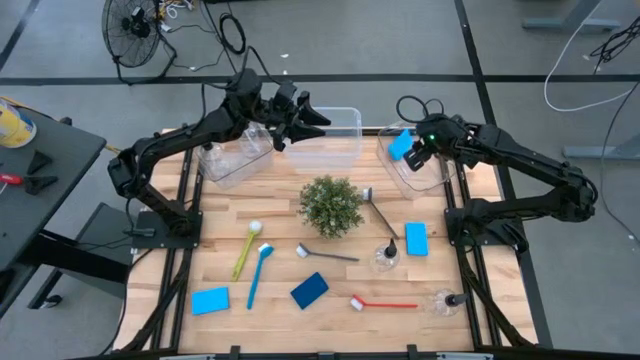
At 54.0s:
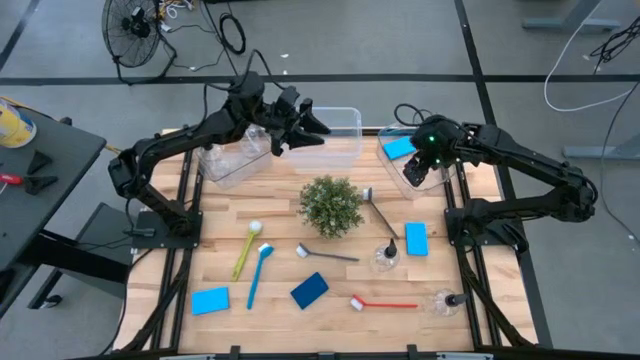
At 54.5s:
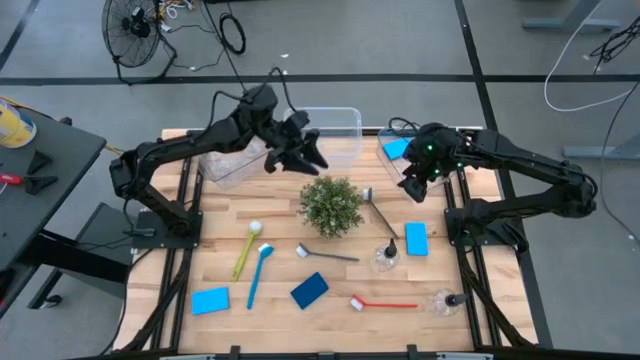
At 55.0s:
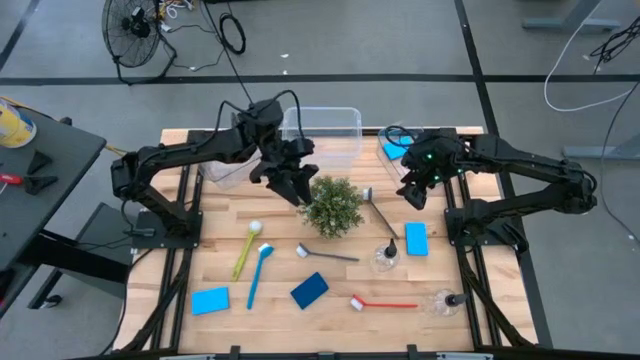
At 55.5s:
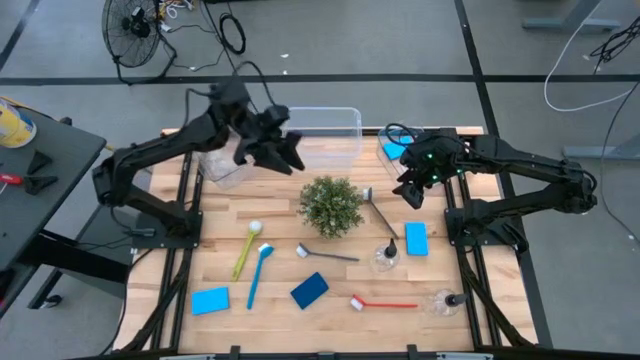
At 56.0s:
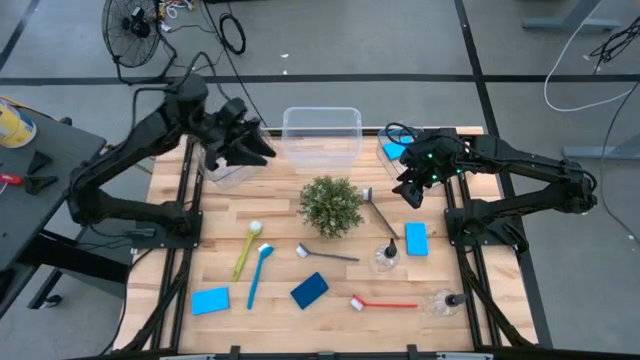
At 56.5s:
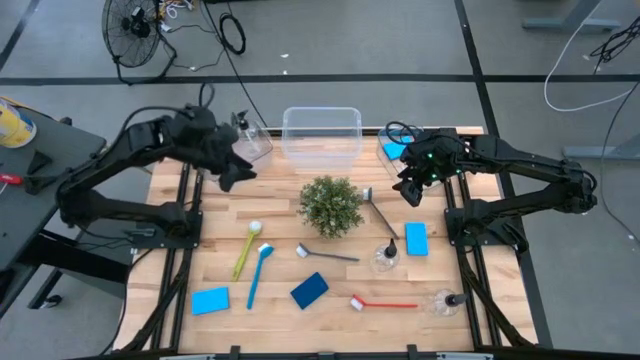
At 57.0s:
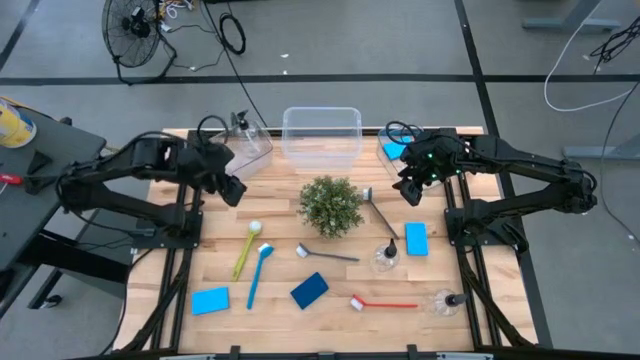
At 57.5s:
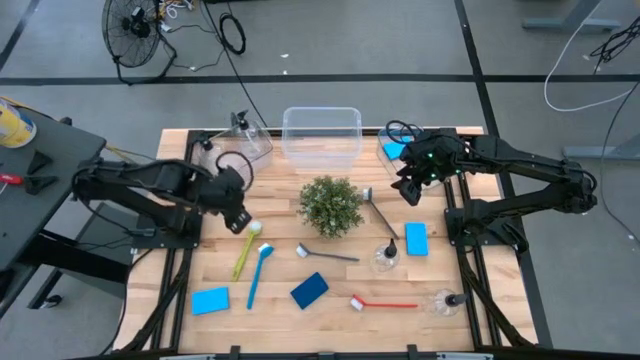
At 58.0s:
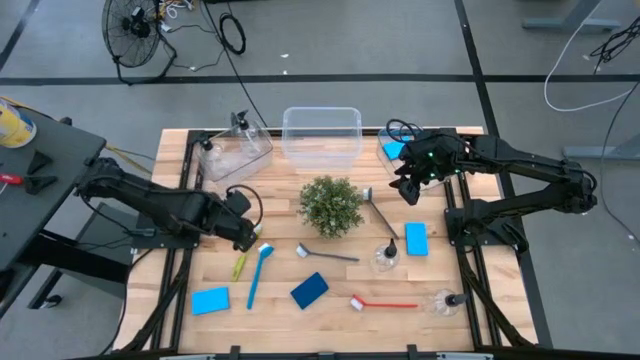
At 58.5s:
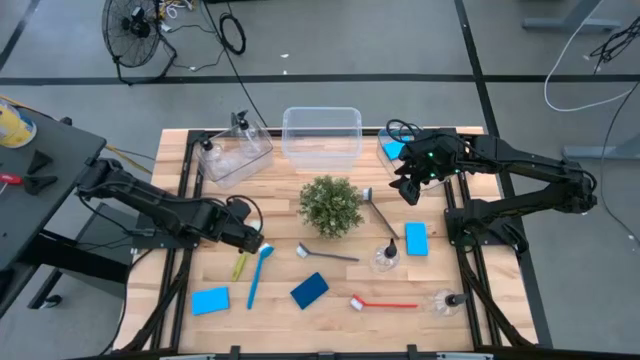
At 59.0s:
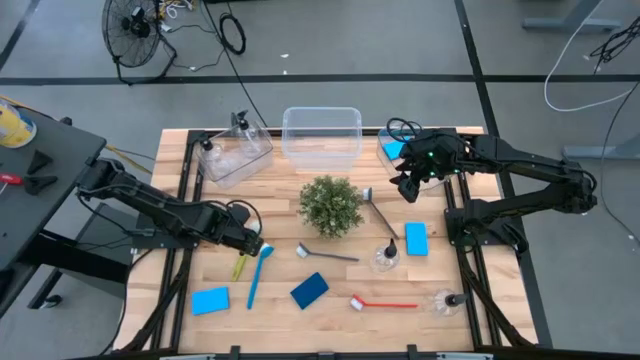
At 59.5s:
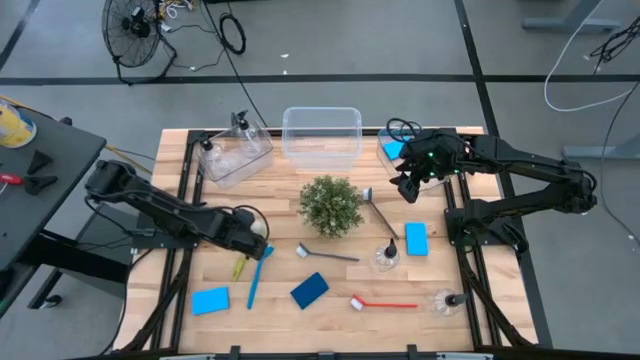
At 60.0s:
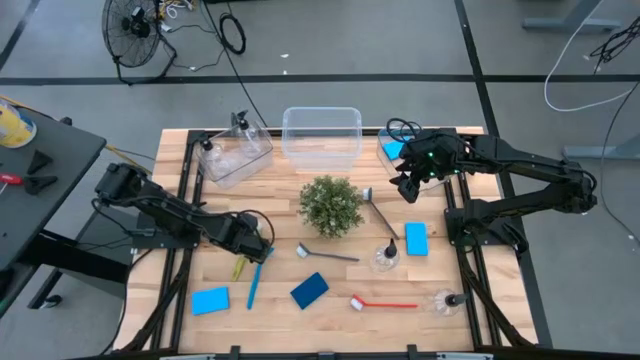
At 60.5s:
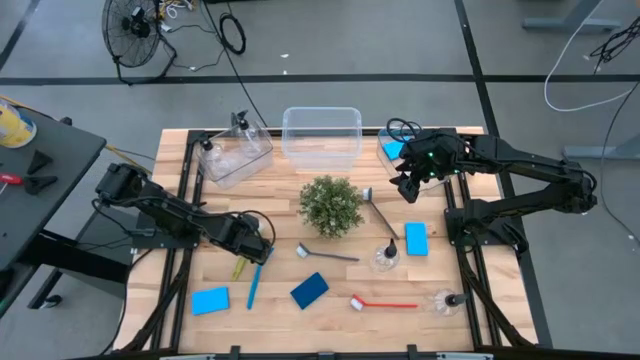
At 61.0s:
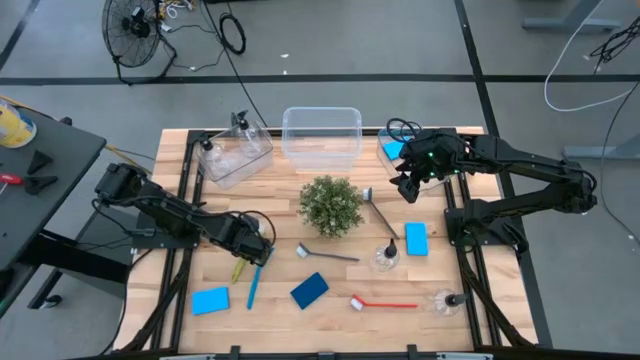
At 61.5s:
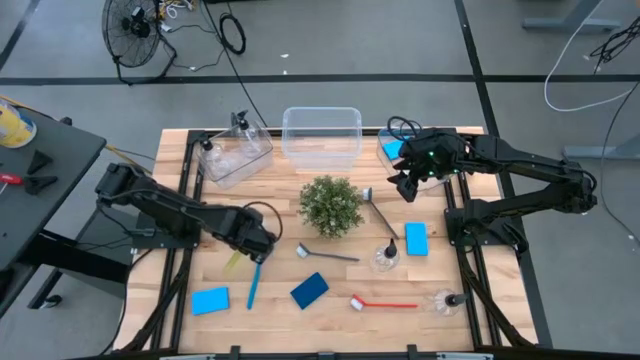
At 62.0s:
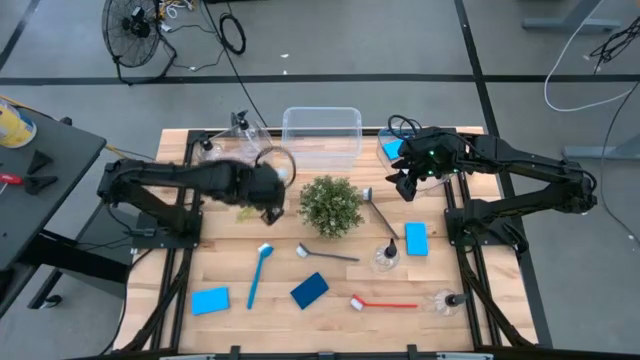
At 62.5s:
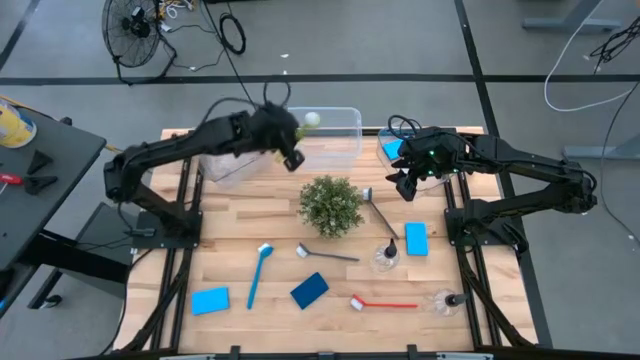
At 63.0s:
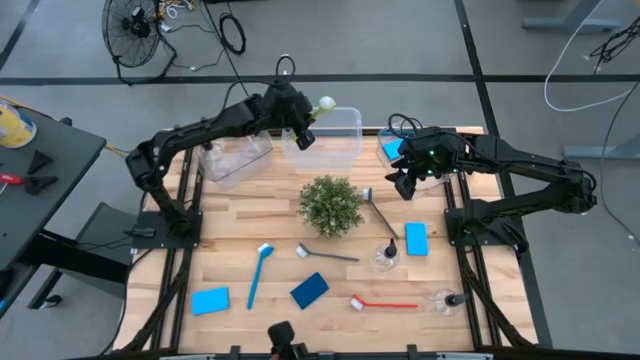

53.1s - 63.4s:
Task: Pick & Place Kitchen Sink Supplies
Put the green dish brush into the white bin

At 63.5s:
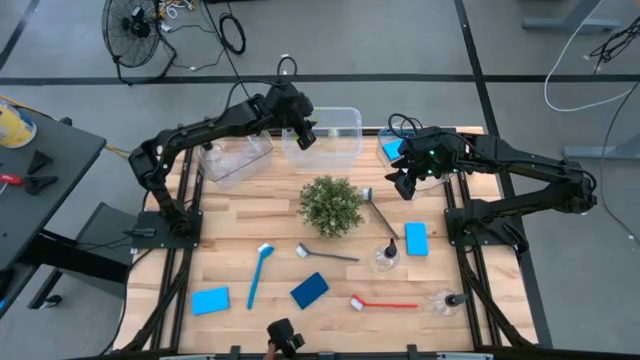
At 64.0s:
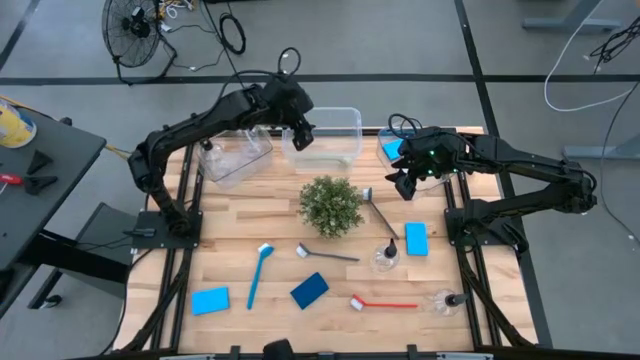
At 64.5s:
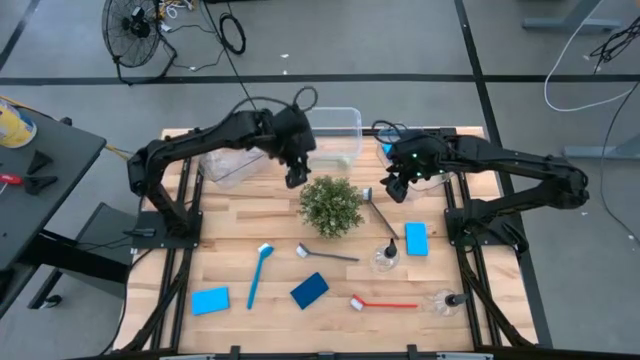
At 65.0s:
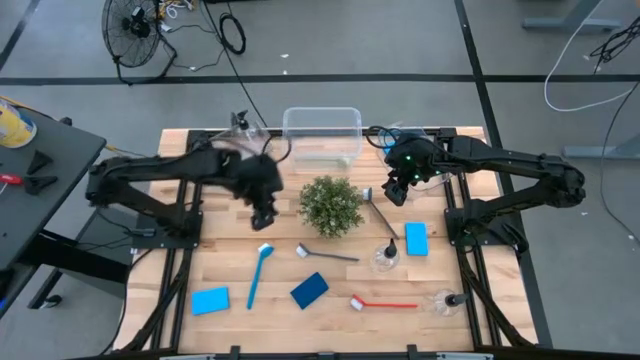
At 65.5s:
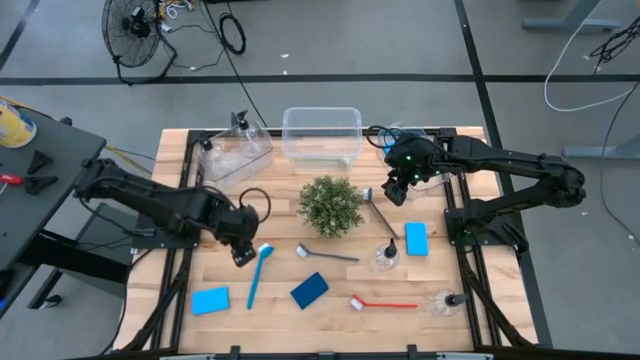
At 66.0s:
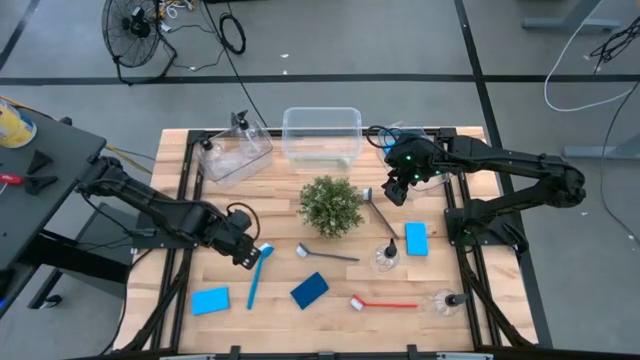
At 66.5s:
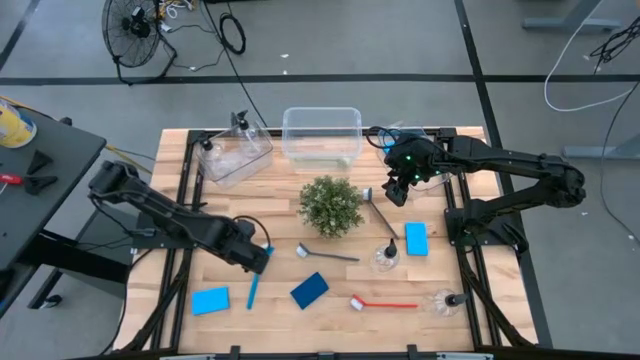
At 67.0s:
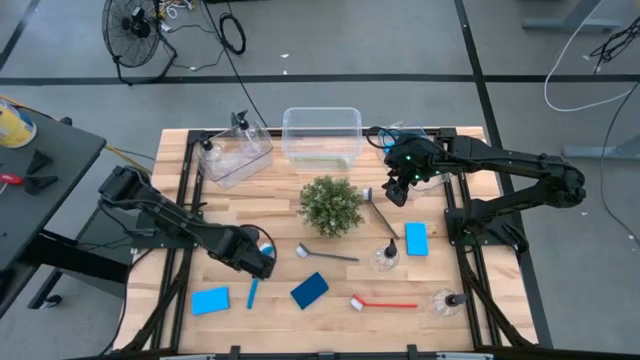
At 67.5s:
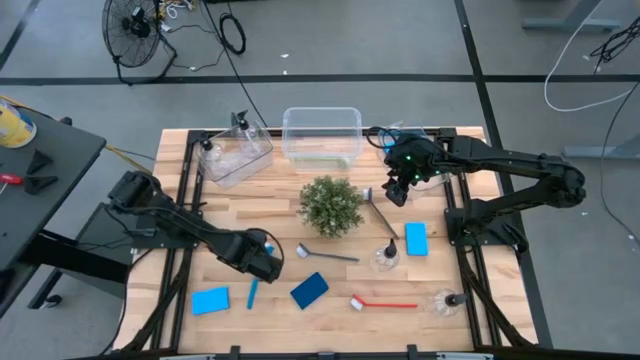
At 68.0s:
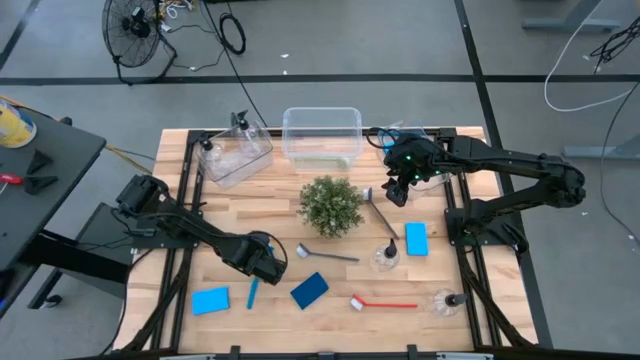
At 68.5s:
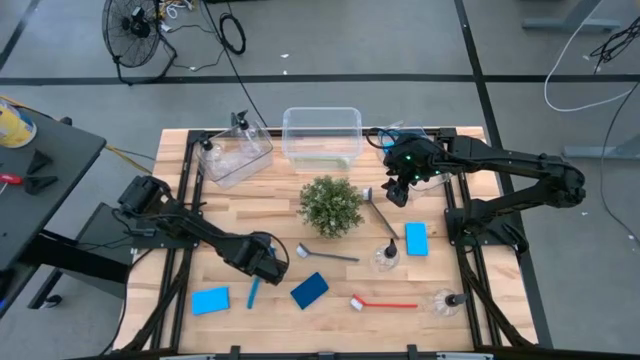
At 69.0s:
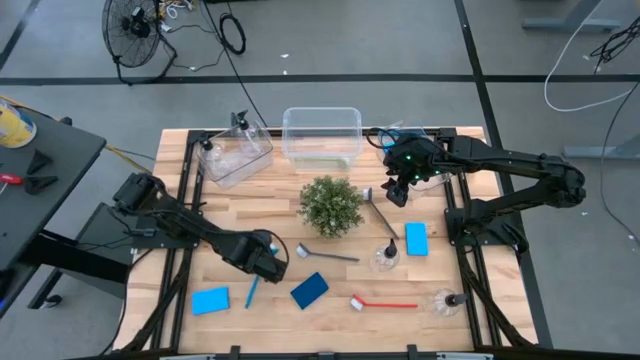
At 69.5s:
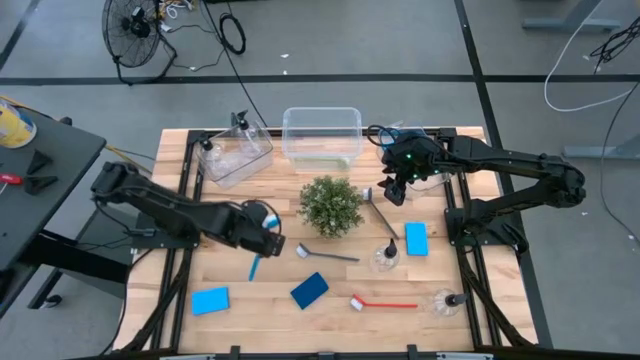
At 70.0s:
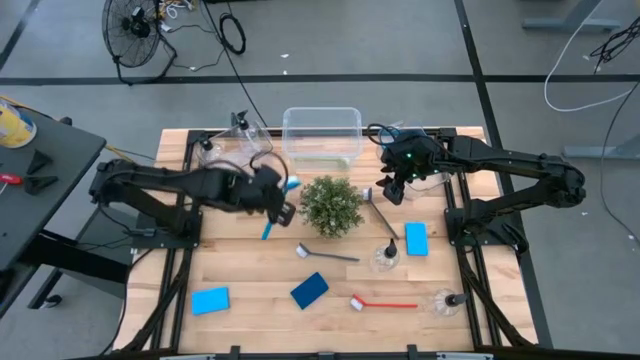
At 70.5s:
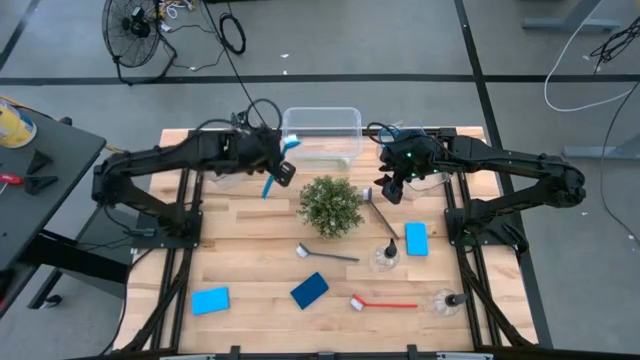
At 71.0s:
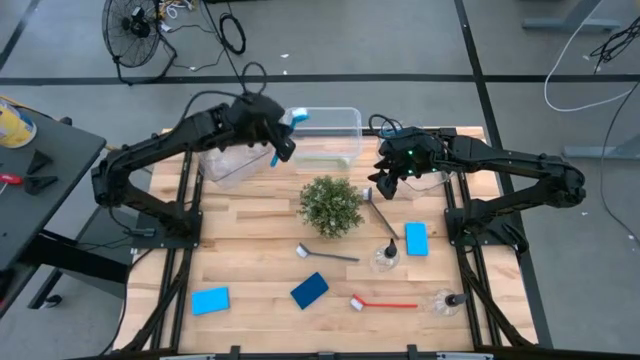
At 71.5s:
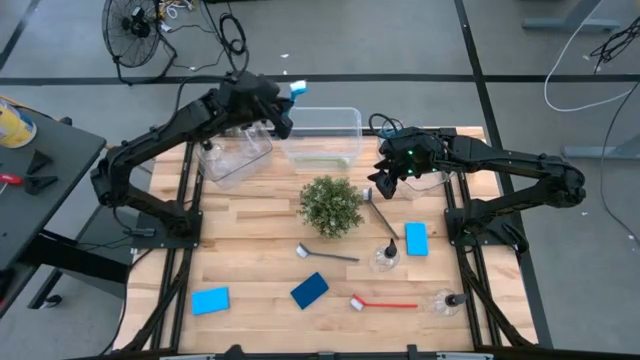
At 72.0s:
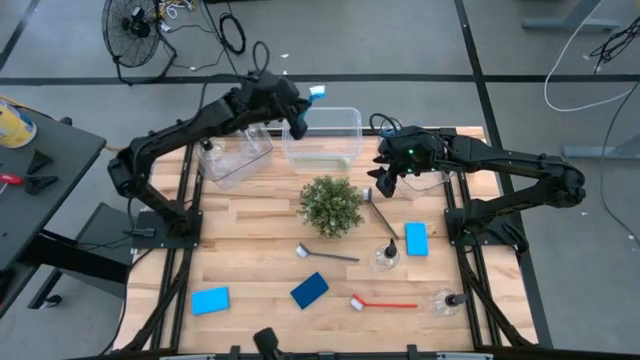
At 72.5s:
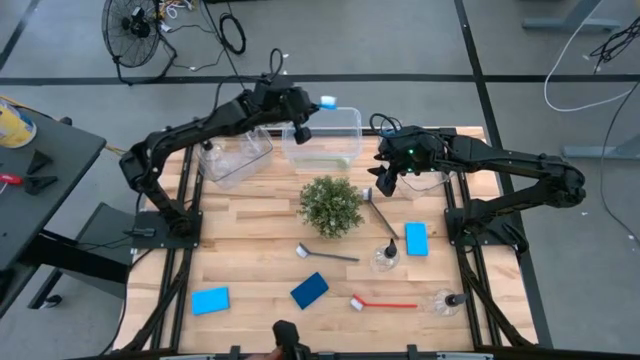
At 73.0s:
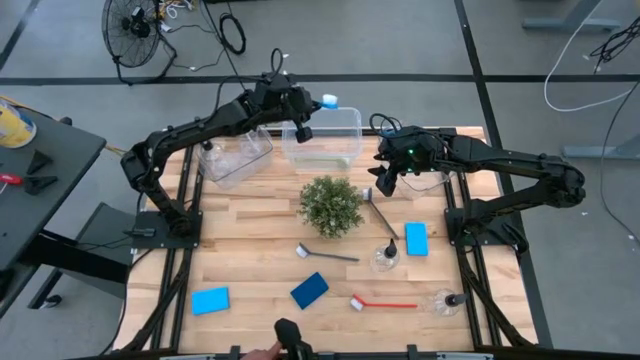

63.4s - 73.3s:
Put the blue dish brush into the white bin
